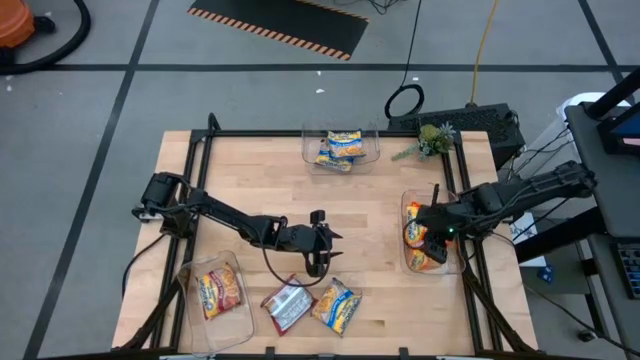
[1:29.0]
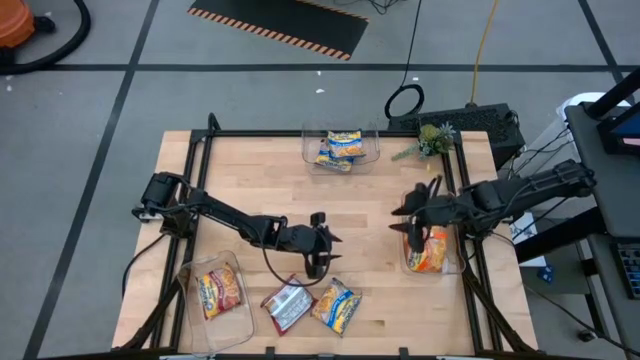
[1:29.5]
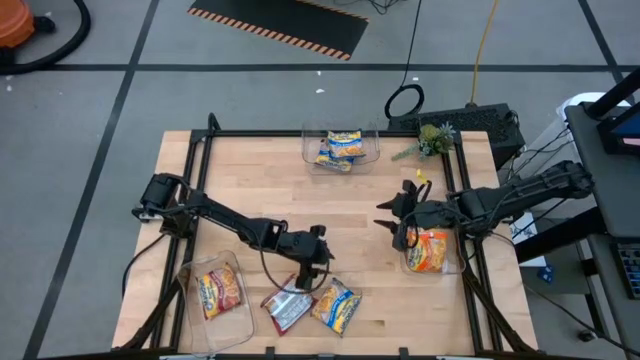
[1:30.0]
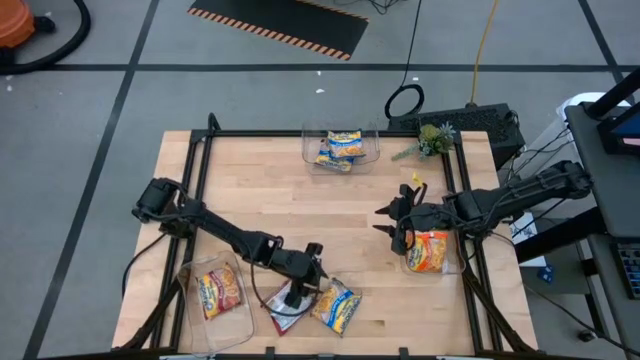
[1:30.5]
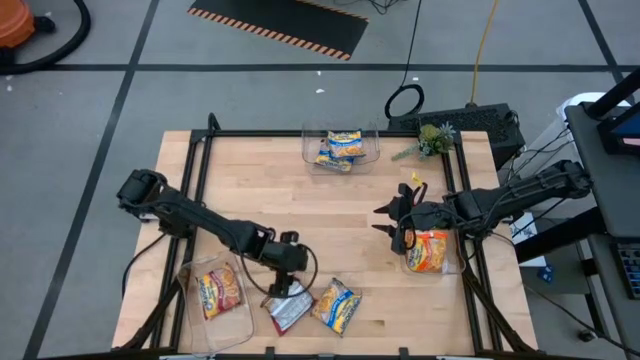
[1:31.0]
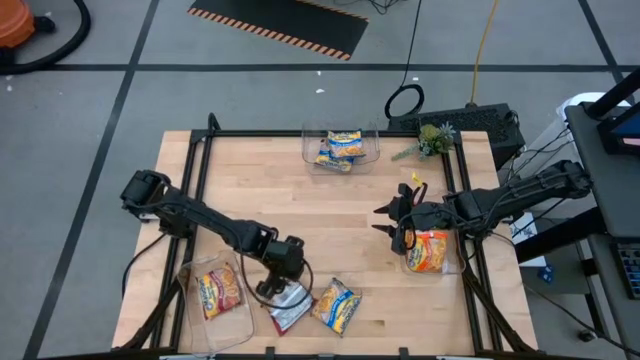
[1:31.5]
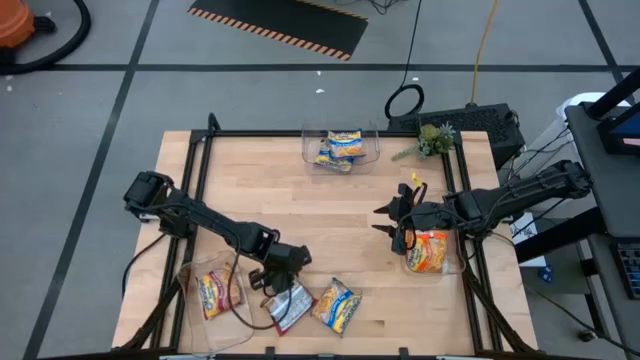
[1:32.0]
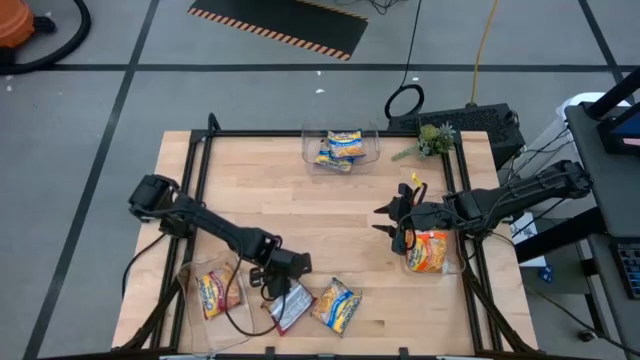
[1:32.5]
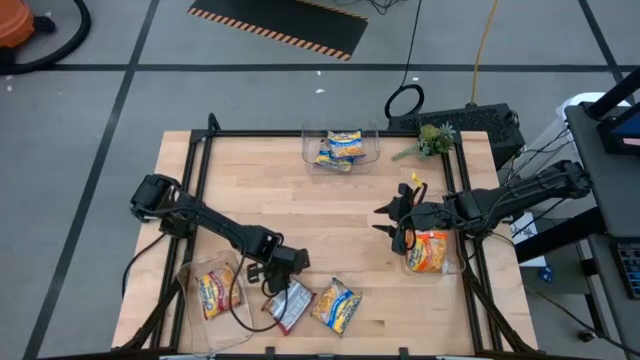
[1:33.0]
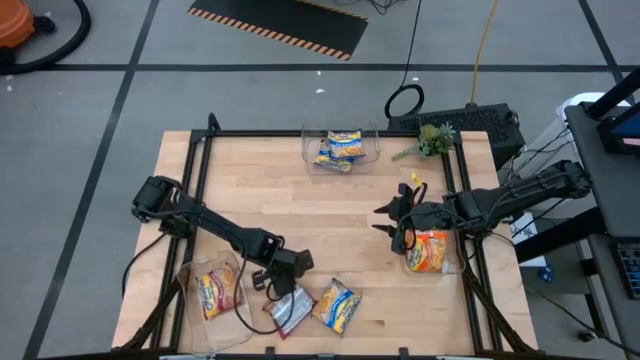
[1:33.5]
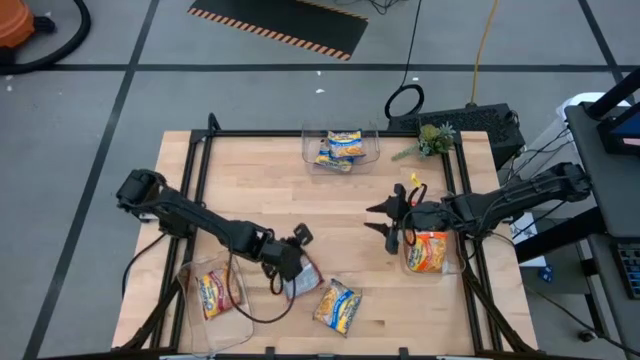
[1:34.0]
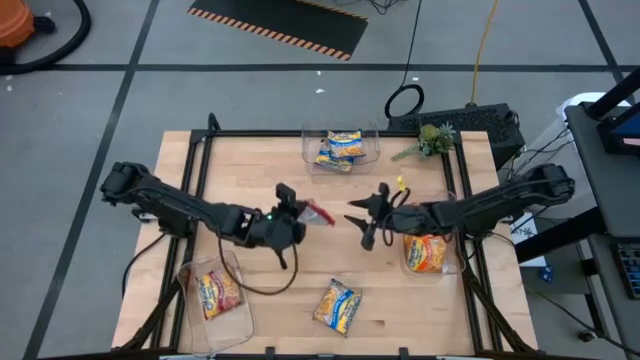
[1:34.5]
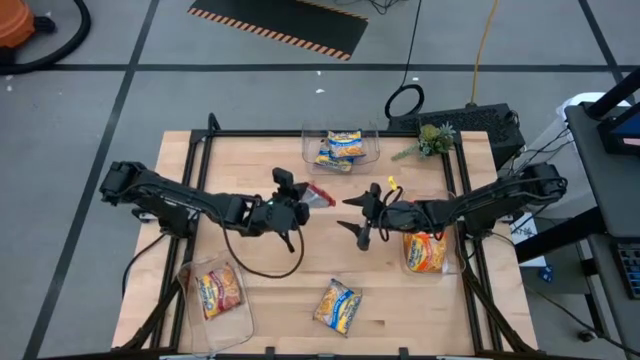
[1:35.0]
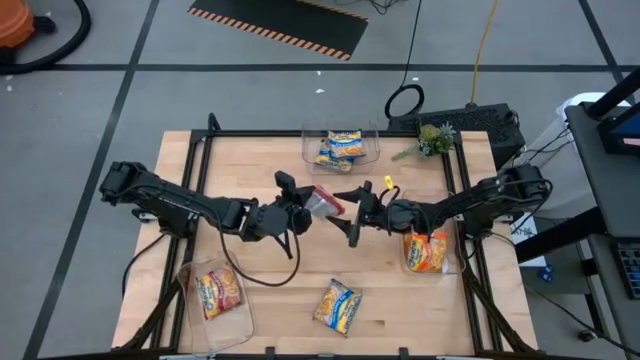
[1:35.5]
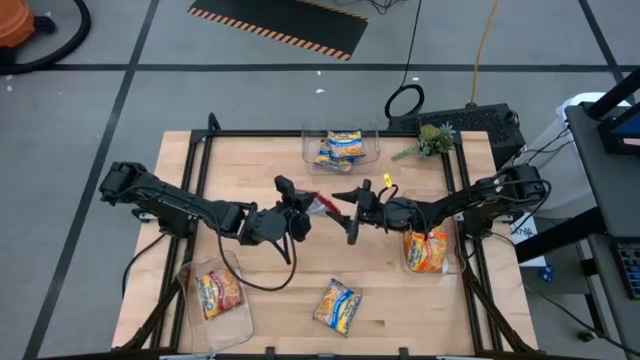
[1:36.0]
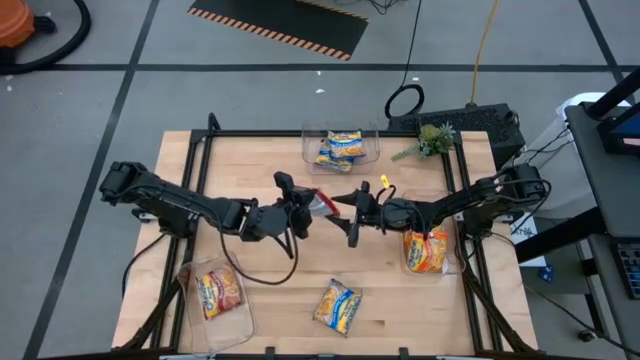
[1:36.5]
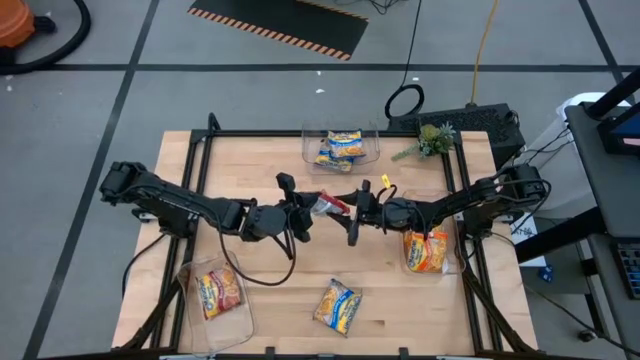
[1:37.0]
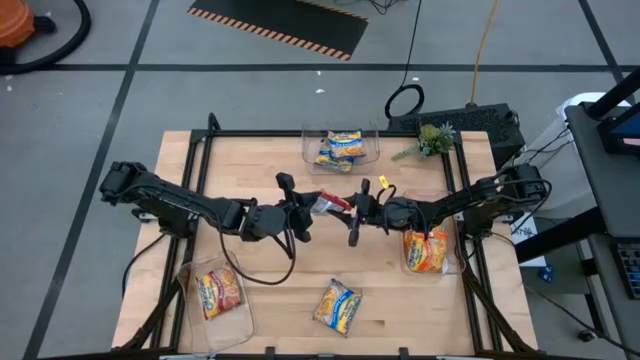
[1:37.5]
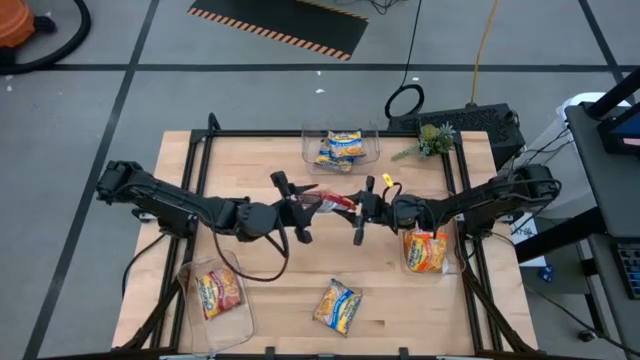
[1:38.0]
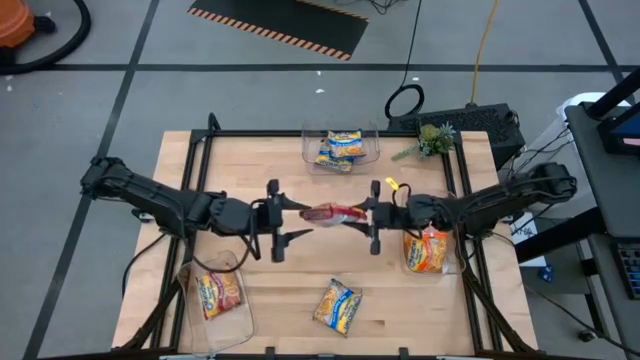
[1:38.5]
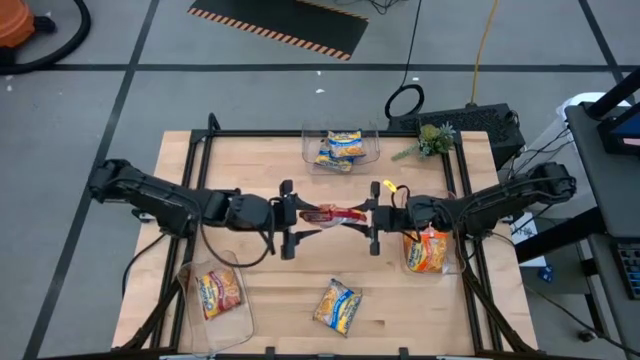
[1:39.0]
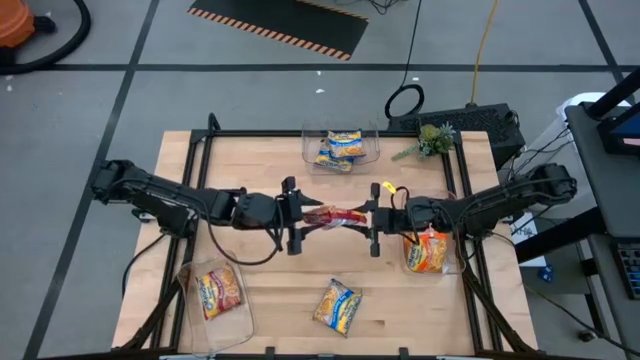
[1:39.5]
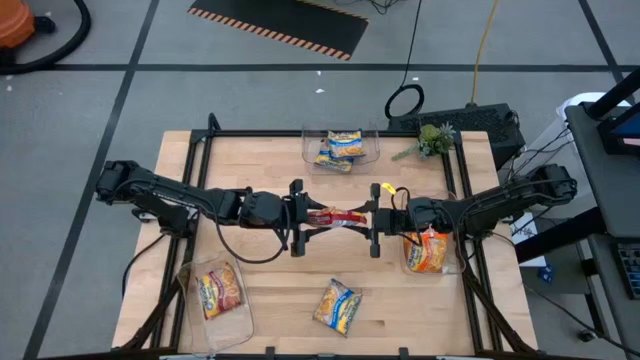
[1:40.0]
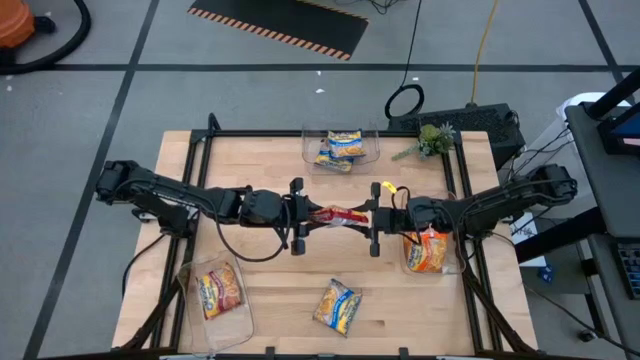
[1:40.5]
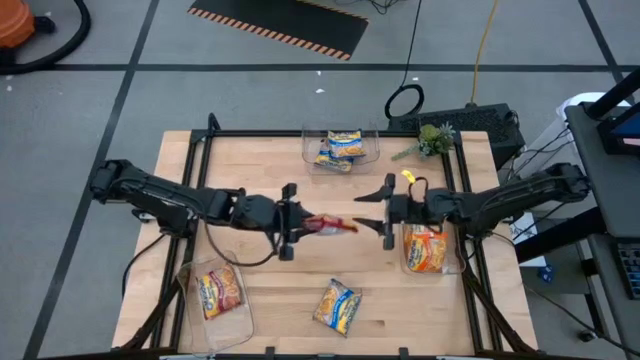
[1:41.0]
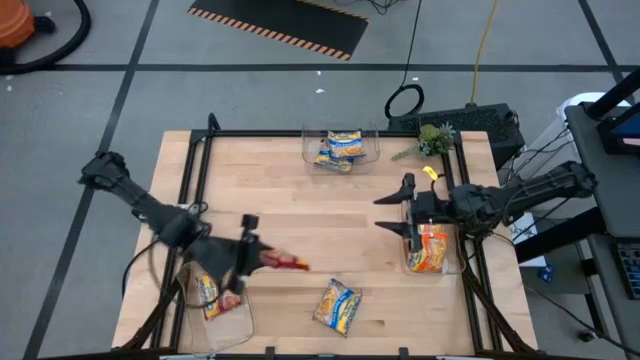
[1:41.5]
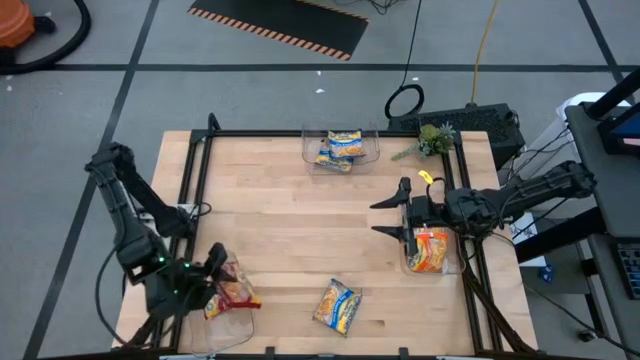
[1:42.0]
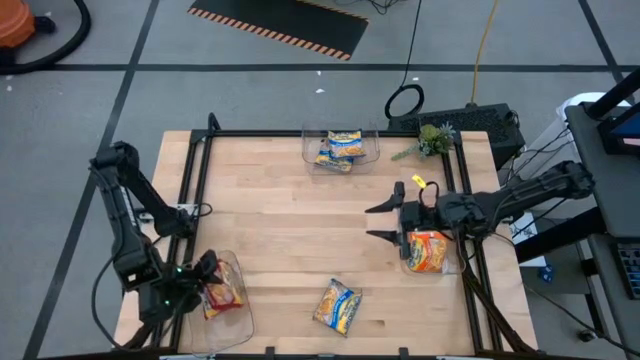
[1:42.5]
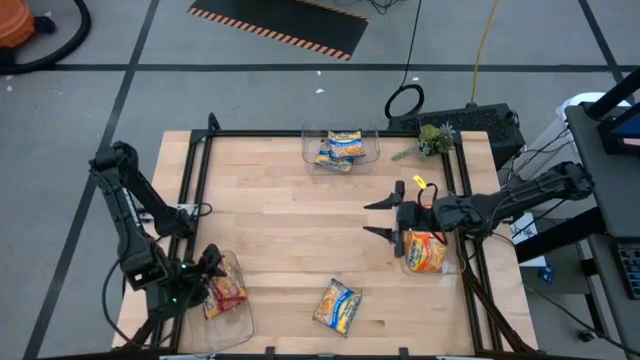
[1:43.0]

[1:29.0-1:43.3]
Task: Sort Maruchan noodles
Put the red noodle pack into the left transparent bin

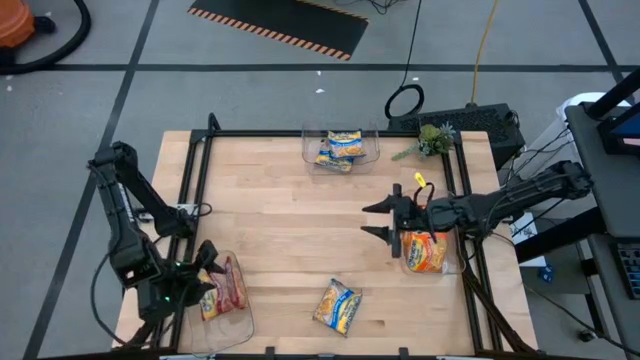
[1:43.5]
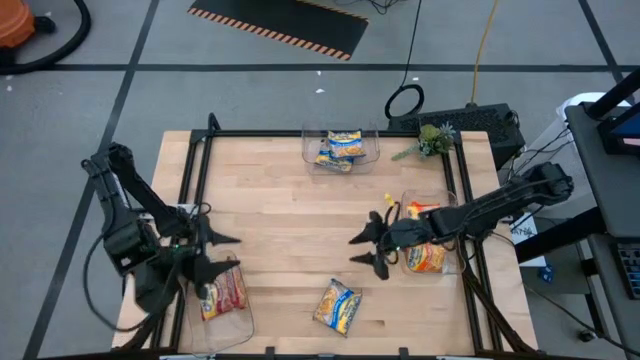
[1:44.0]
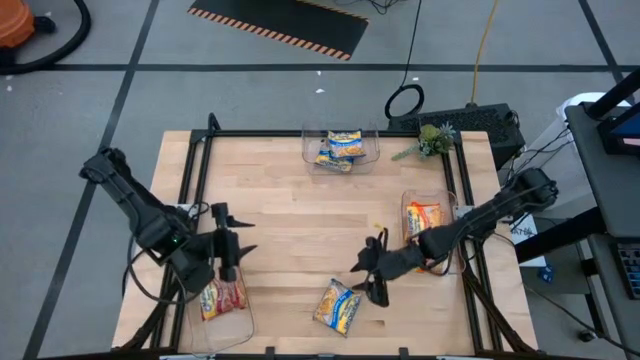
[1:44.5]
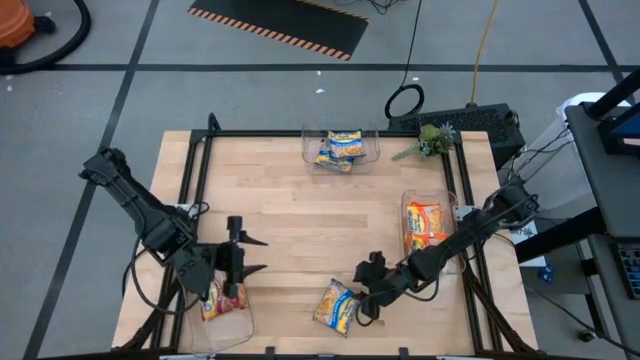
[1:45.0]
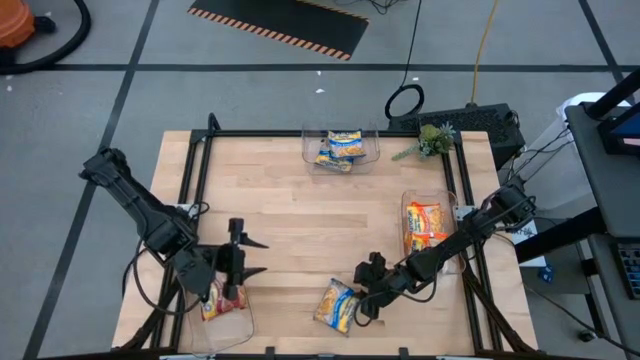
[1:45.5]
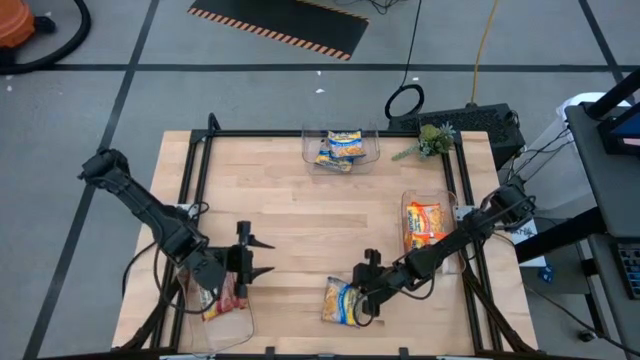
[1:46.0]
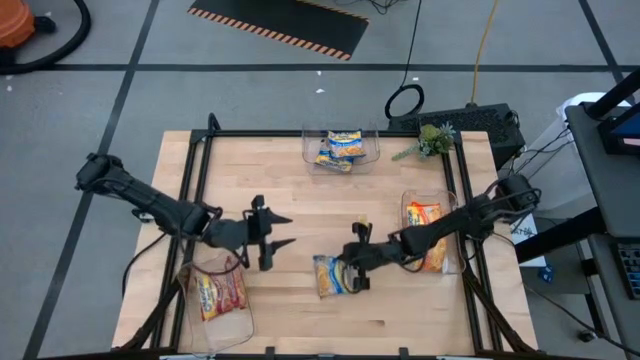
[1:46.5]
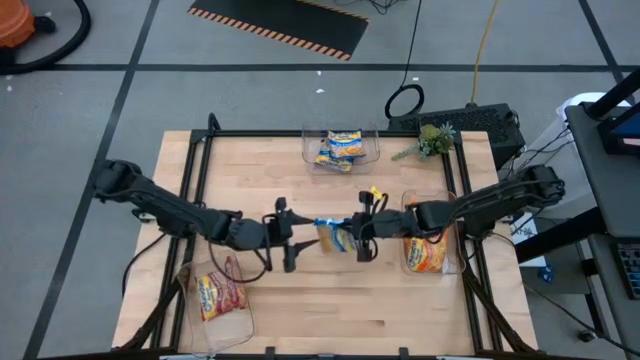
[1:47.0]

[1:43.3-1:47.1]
Put the blue noodle pack into the top center transparent bin

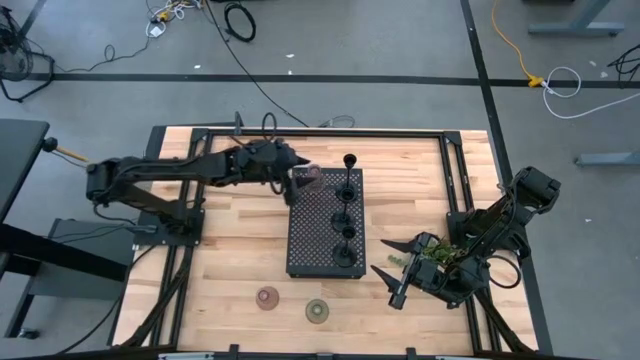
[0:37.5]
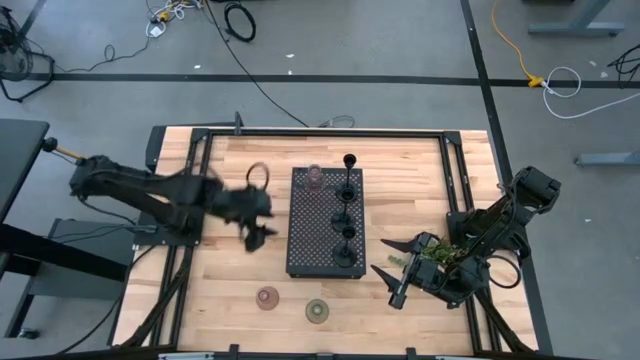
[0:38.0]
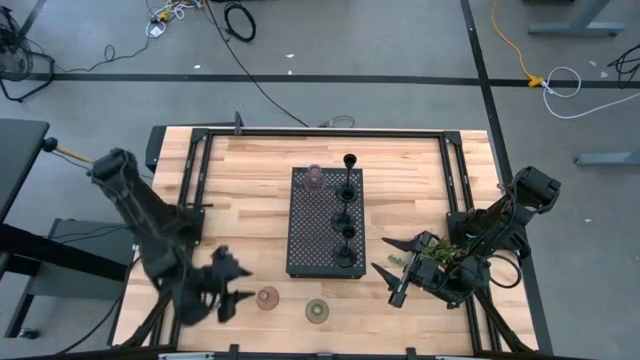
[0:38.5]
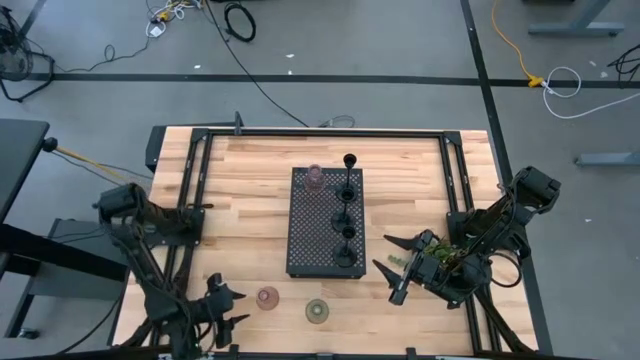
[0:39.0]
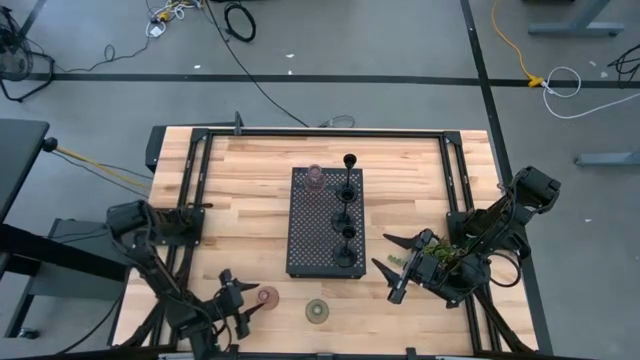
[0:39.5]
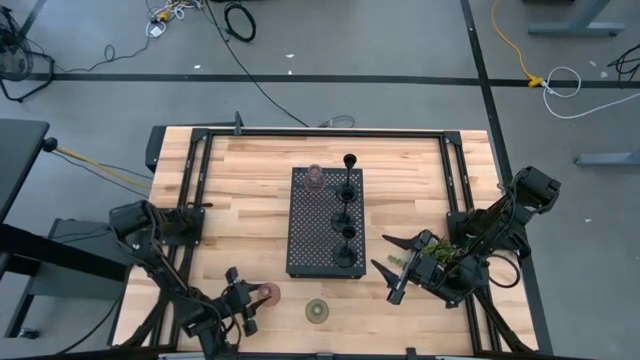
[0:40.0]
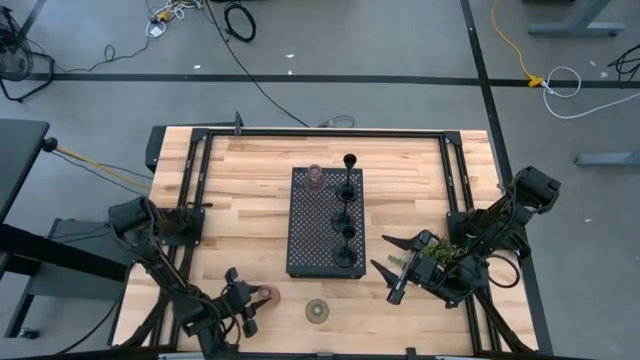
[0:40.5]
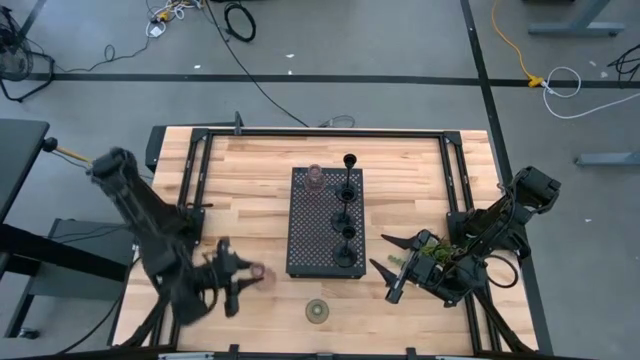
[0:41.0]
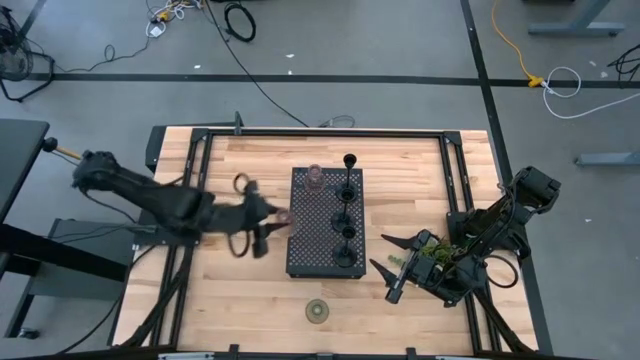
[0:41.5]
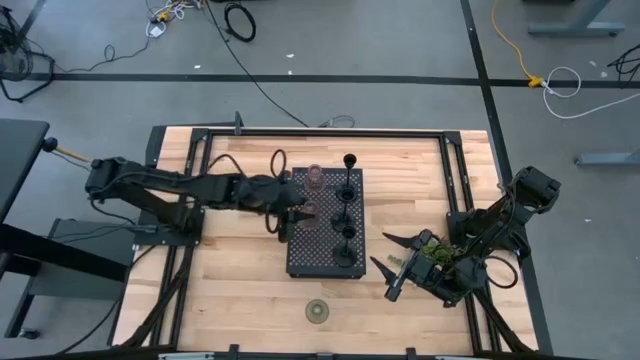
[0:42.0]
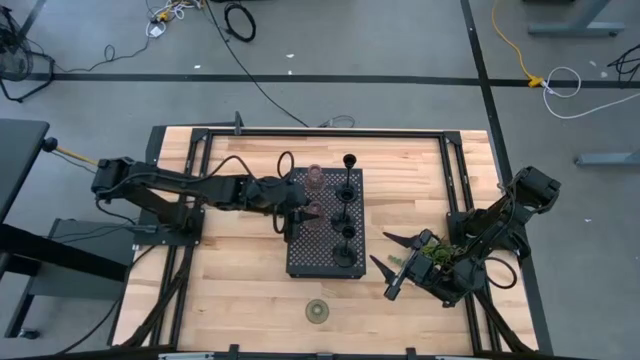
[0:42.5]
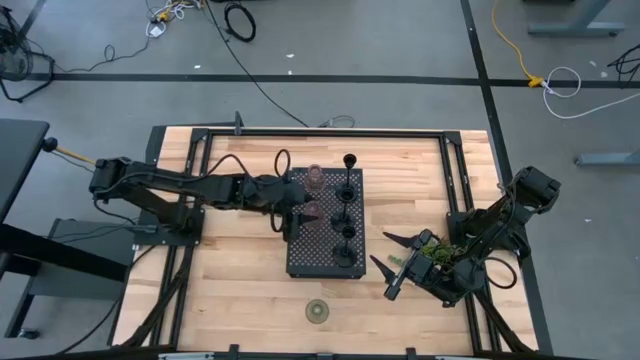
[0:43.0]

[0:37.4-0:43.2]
Task: Pick & Place candle stick holders
Put the pink glass candle holder on the shelf aligned with the other pink glass candle holder
